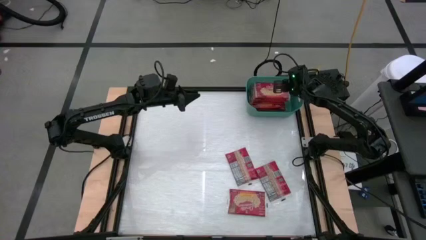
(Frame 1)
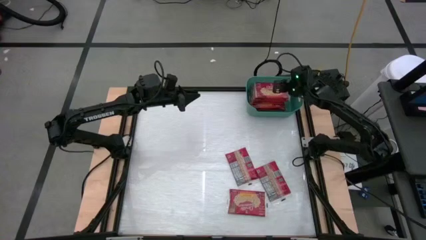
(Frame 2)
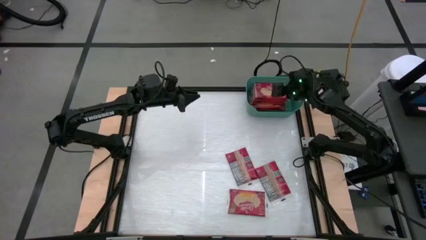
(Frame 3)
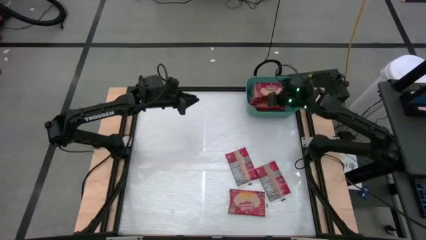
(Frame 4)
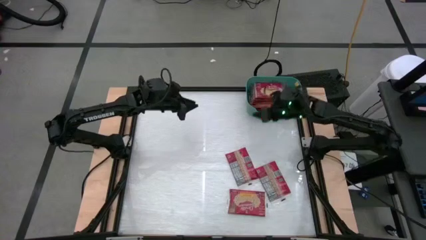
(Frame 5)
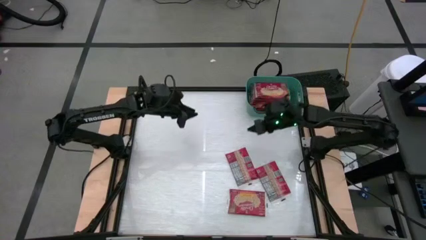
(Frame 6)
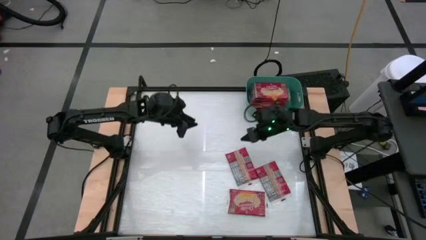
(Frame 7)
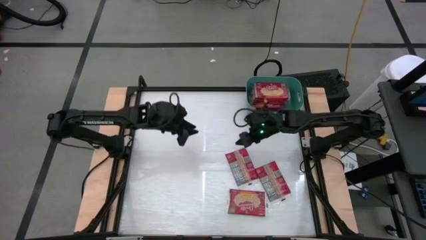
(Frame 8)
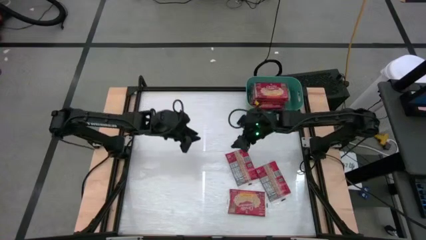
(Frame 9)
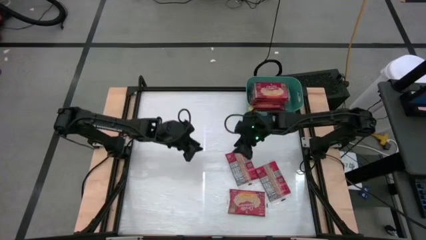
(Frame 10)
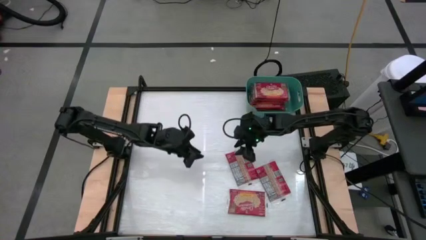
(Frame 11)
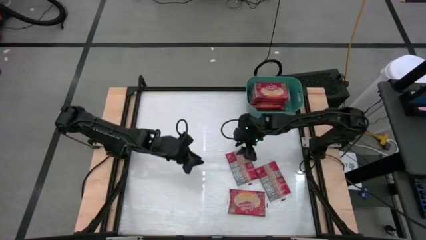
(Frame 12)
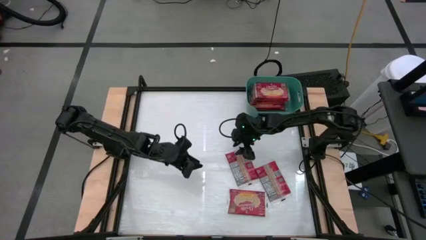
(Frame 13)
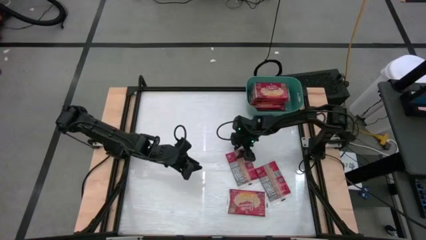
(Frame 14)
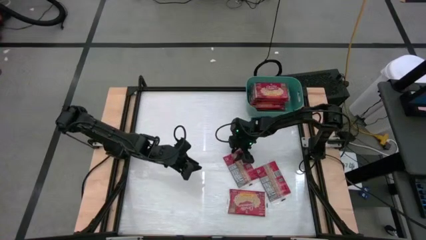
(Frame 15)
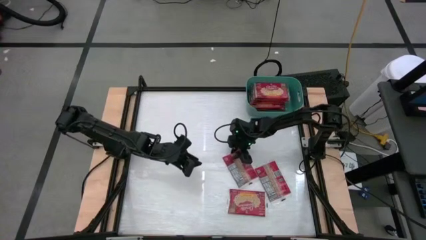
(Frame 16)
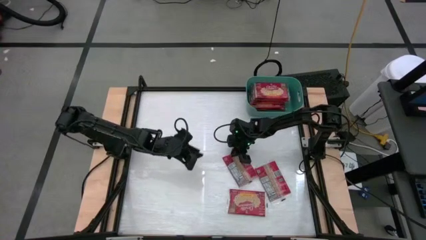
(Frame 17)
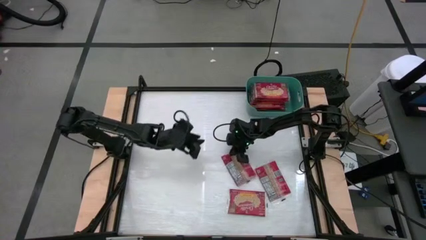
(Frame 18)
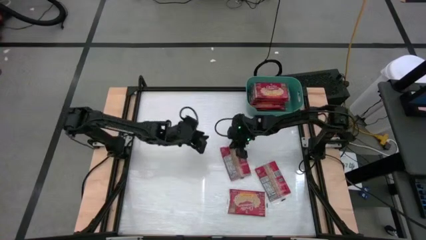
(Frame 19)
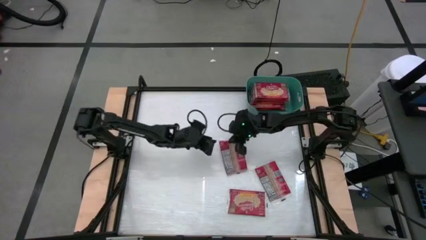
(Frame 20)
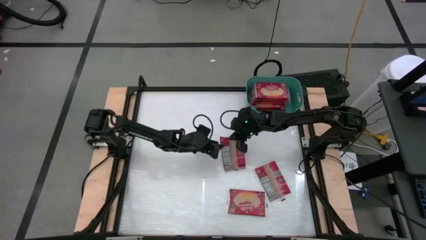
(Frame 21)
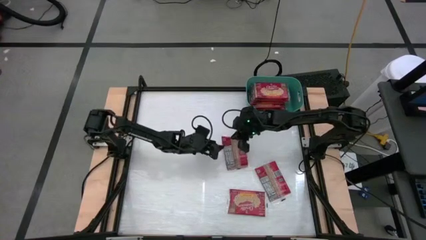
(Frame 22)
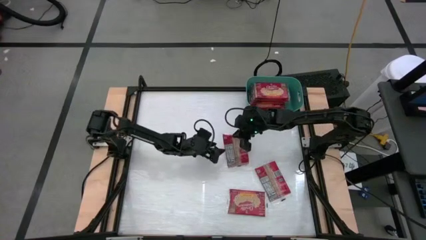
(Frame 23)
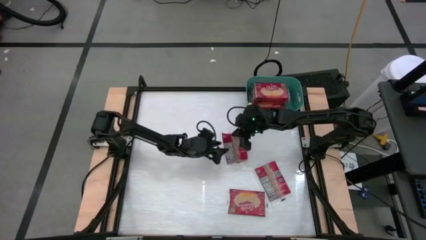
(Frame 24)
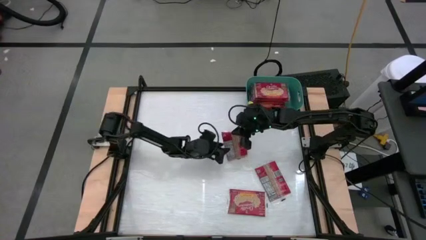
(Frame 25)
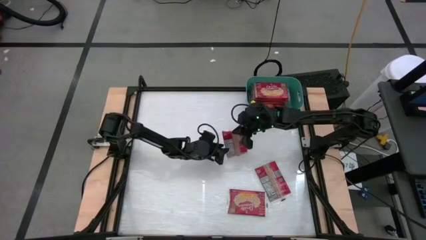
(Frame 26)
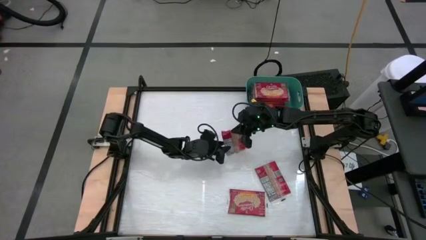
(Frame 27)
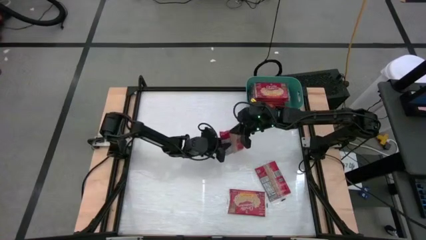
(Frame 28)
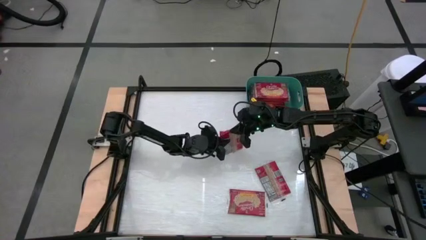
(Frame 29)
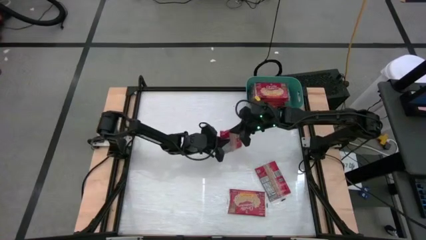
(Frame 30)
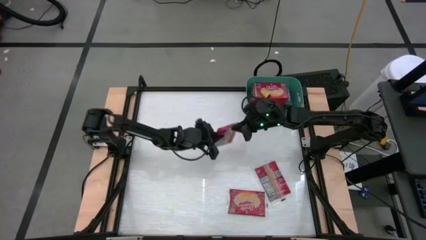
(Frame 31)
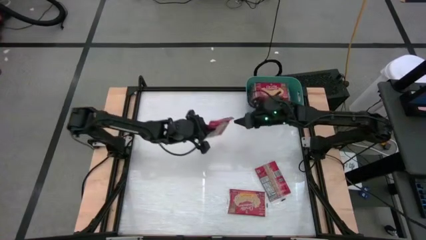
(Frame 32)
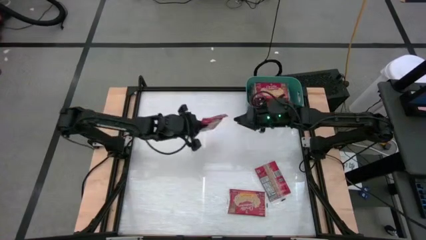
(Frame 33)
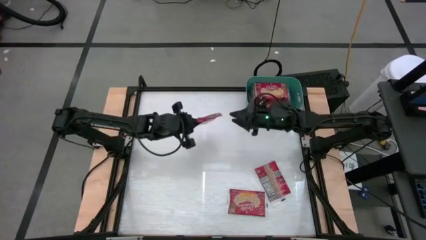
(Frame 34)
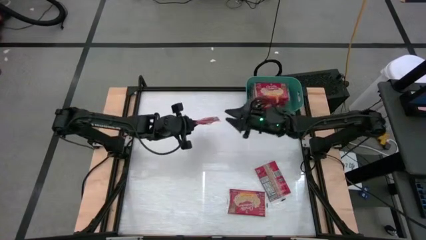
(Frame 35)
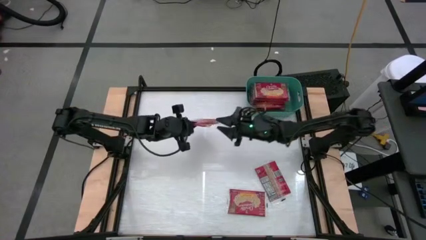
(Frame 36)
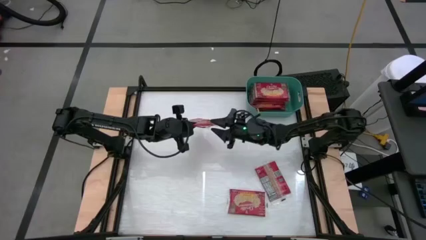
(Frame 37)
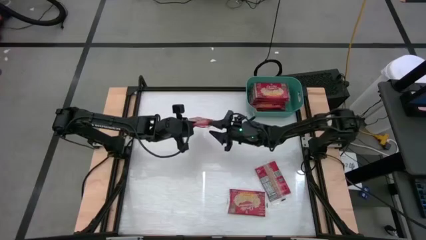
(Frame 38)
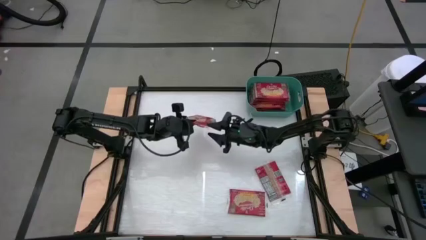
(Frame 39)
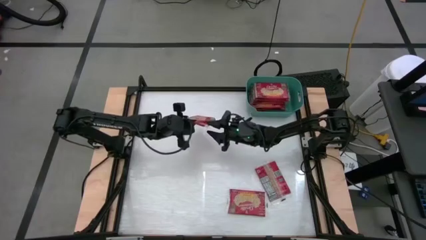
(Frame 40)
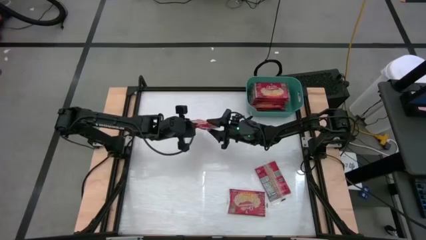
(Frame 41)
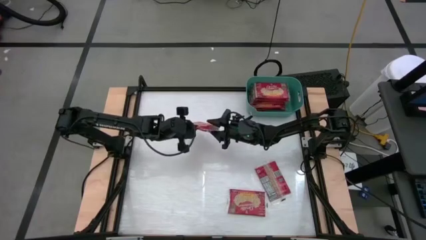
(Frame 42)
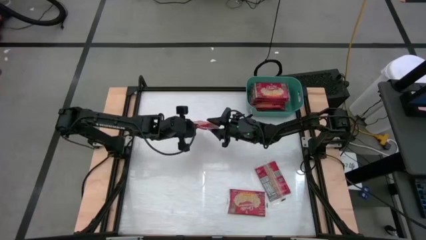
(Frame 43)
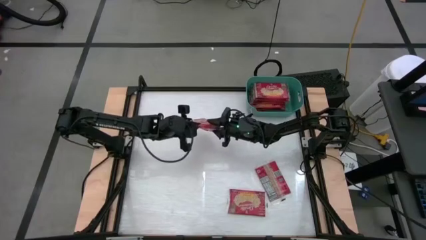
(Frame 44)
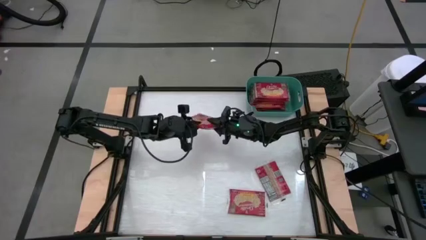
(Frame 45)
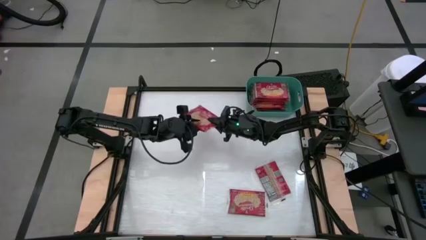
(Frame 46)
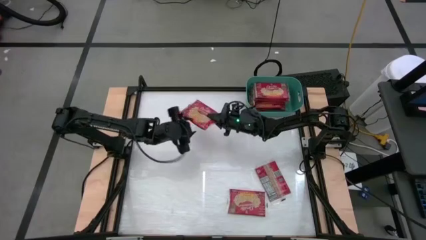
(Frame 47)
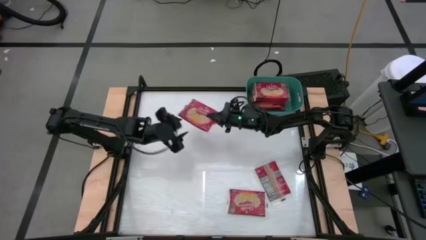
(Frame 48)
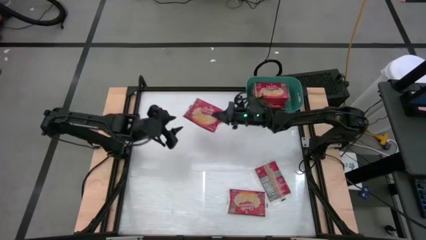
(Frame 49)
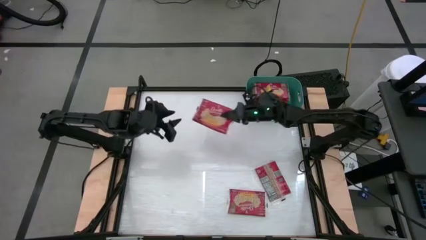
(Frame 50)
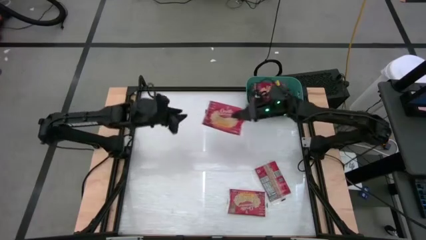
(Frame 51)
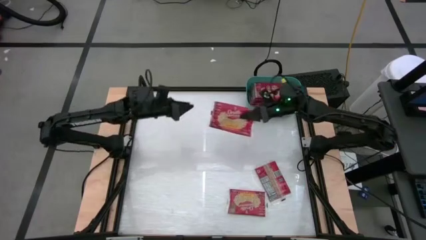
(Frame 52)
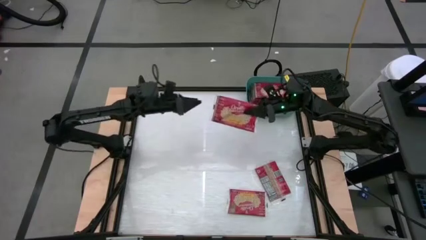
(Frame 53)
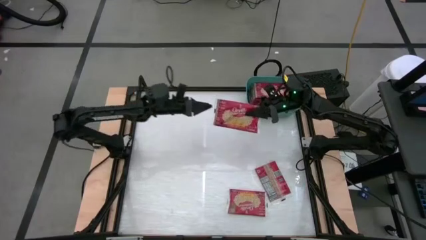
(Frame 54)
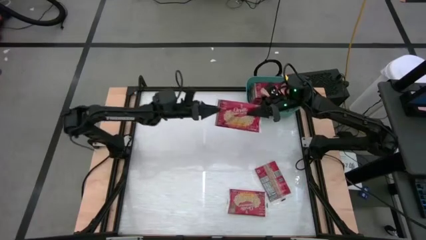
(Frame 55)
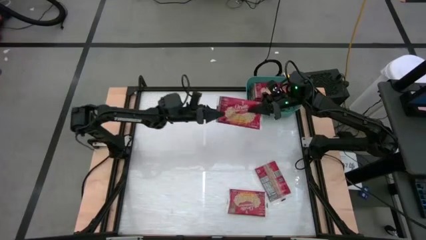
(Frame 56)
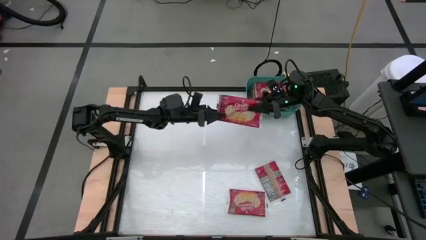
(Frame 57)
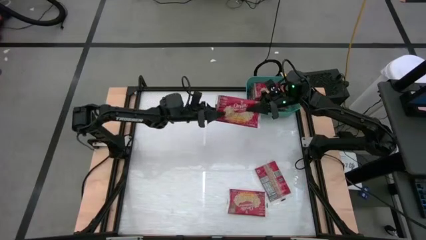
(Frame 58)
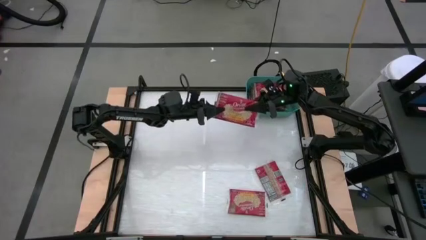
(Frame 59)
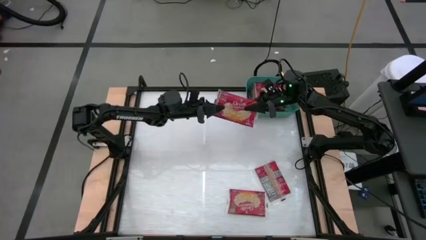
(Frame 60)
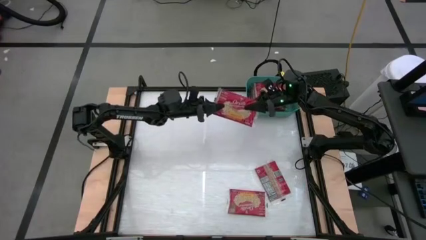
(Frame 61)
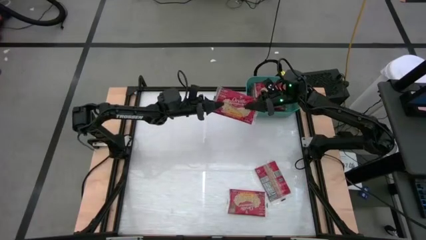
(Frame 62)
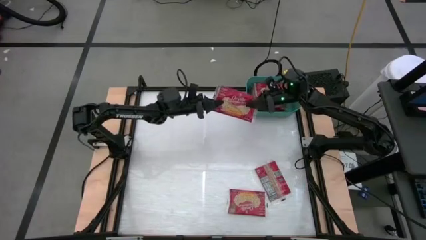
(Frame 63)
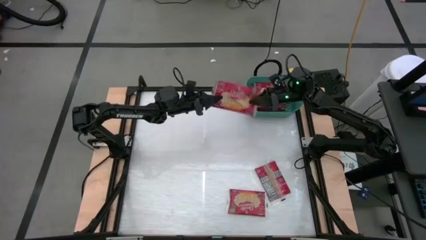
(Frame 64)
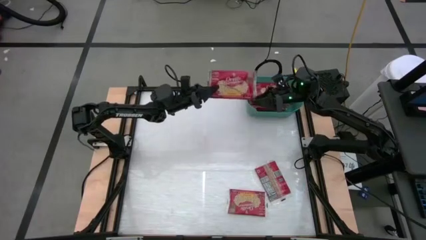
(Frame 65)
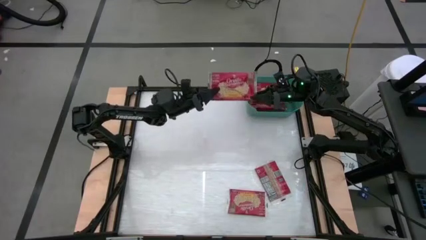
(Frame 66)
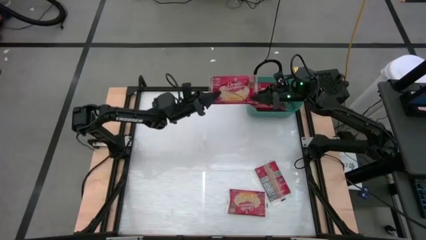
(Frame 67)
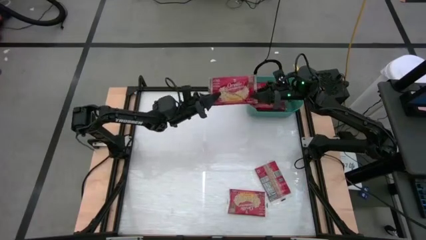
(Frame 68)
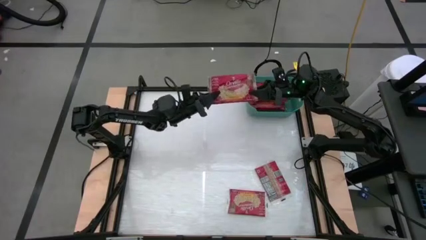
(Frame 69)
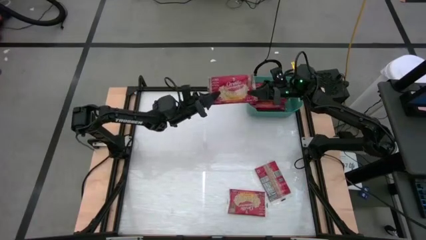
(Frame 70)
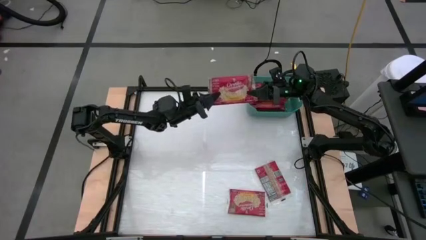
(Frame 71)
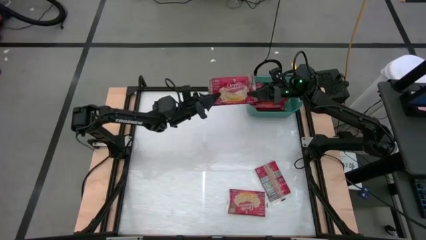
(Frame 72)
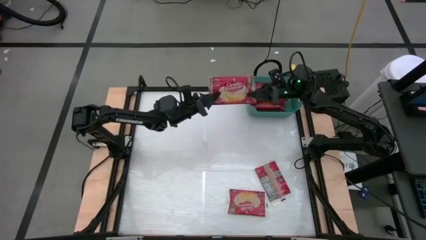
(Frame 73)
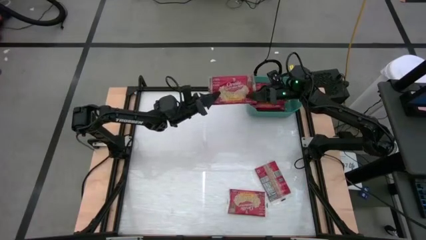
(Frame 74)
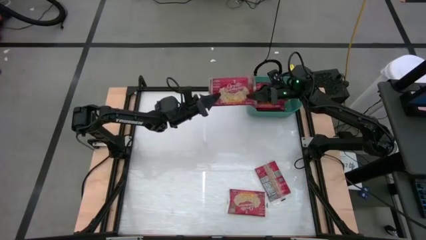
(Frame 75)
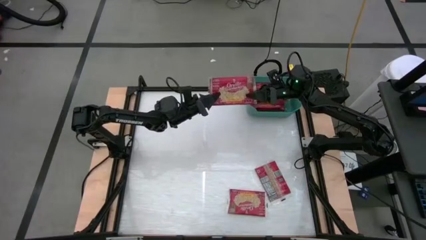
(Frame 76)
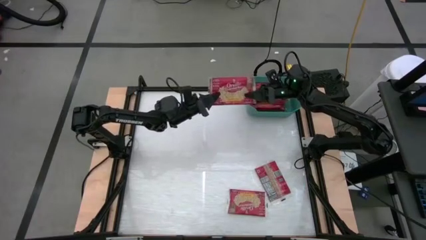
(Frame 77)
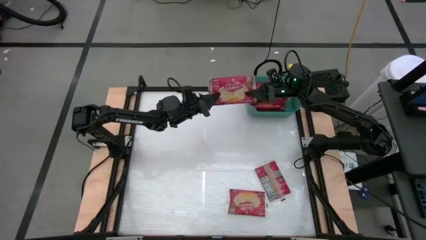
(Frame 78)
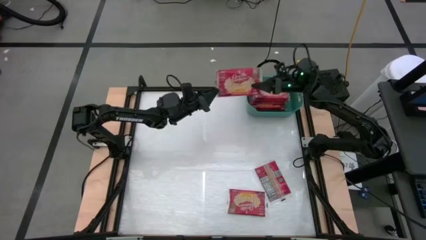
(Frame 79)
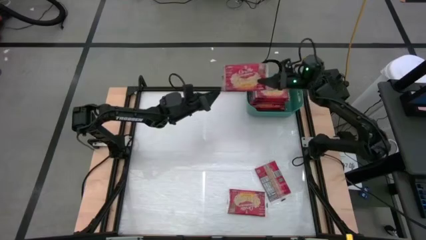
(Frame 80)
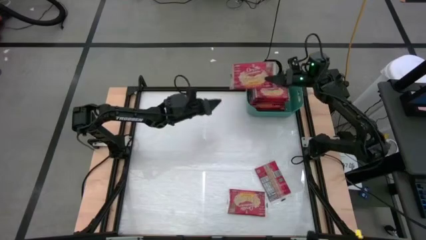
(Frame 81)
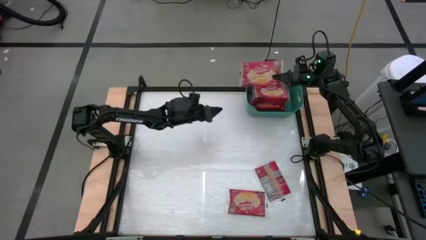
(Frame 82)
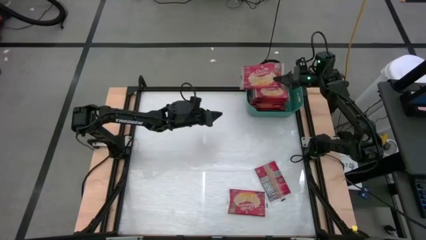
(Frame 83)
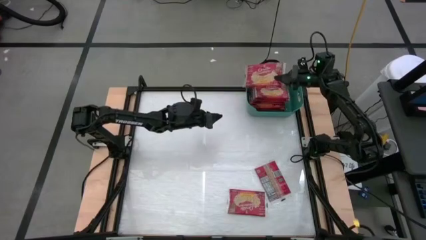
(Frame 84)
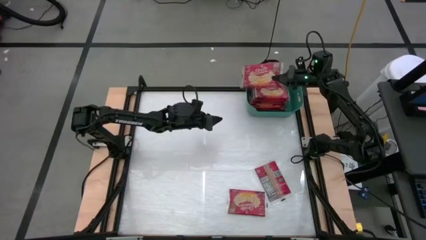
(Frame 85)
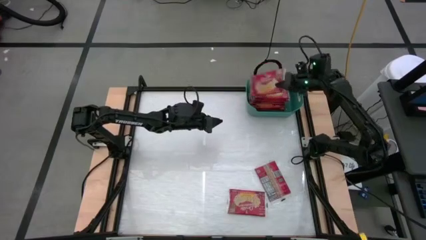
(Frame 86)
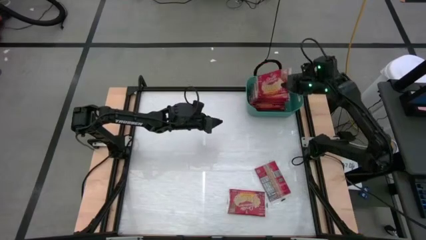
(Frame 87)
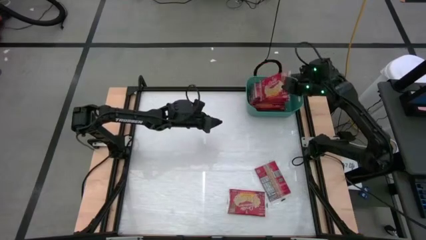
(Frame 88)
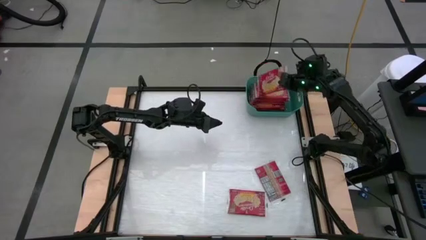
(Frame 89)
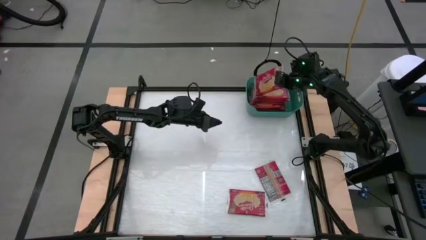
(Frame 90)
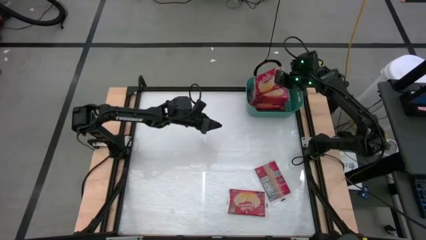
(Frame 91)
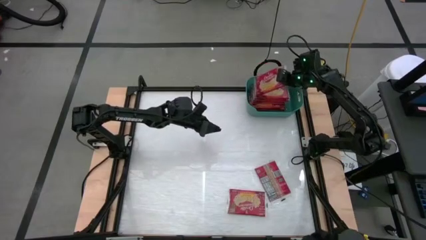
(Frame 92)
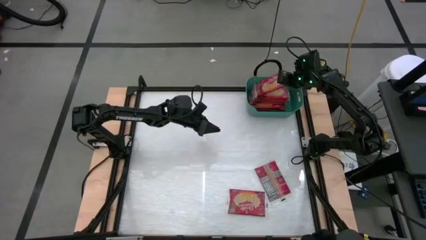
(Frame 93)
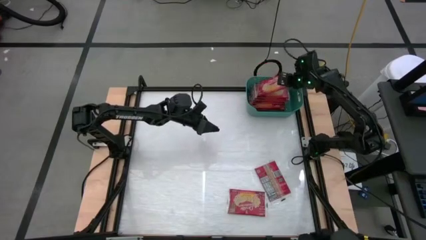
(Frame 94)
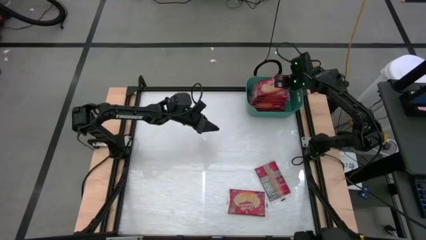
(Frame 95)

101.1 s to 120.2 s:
Task: Sort popcorn bags into baskets
Put the red popcorn bag into the green bin
